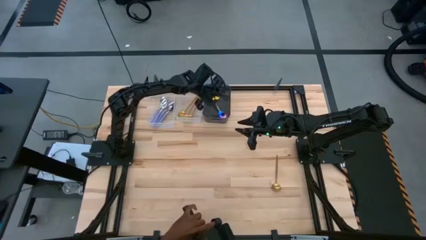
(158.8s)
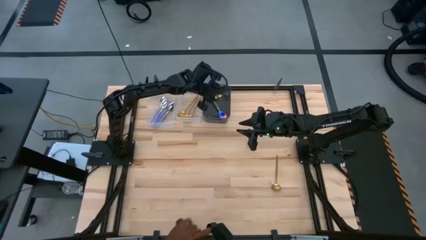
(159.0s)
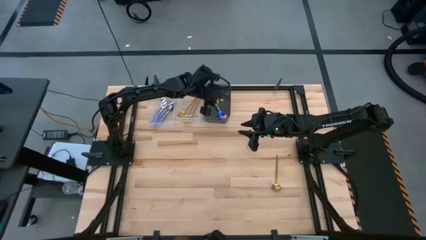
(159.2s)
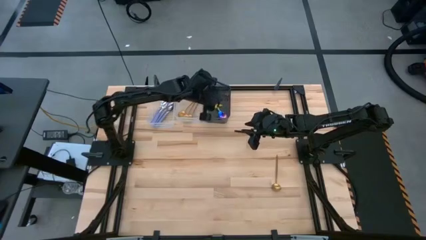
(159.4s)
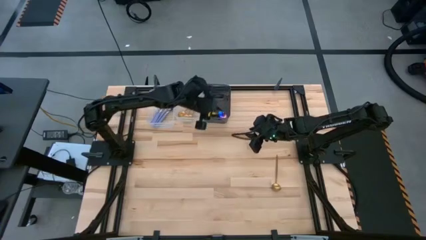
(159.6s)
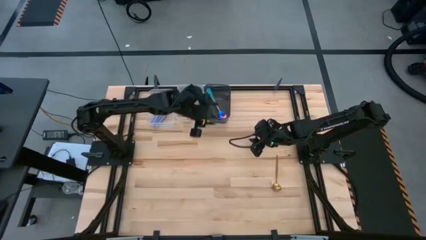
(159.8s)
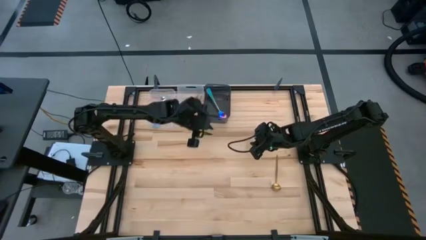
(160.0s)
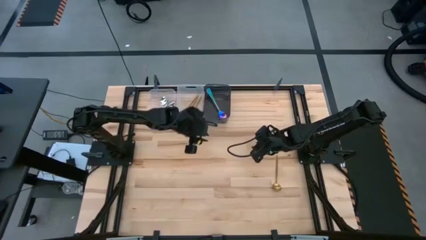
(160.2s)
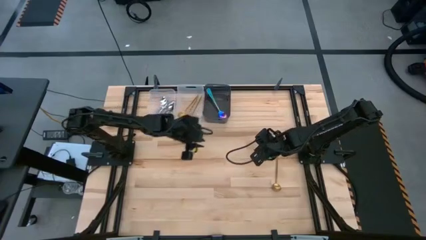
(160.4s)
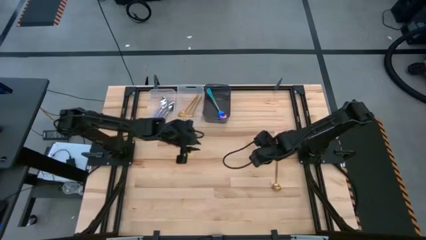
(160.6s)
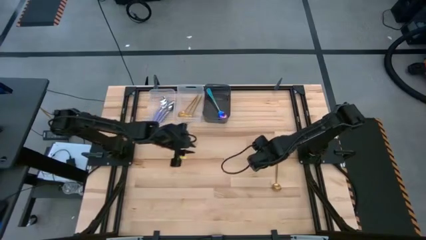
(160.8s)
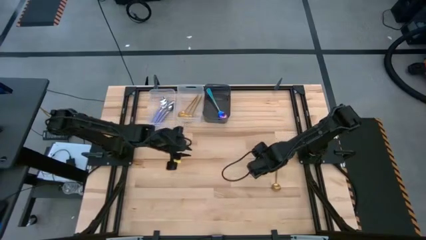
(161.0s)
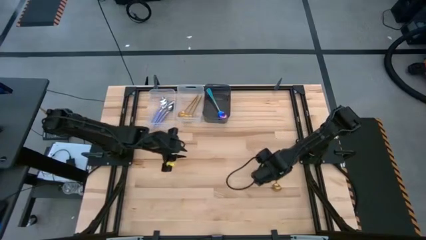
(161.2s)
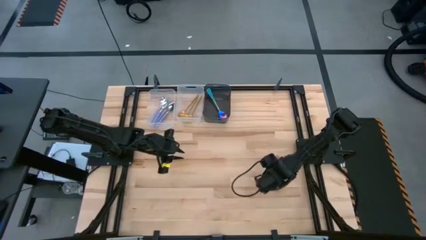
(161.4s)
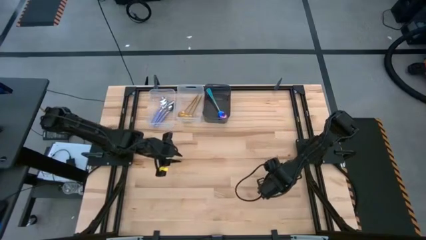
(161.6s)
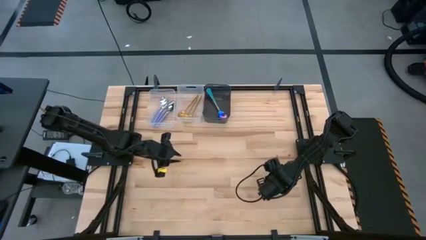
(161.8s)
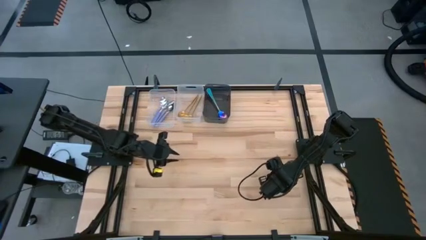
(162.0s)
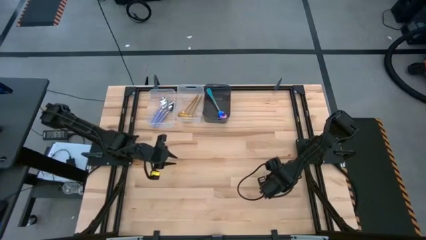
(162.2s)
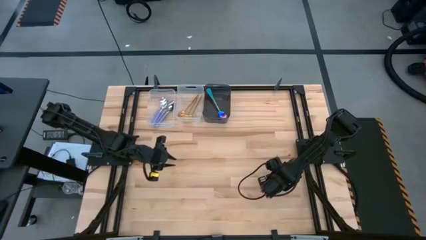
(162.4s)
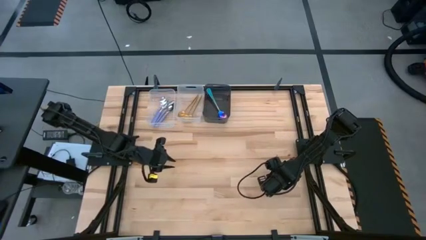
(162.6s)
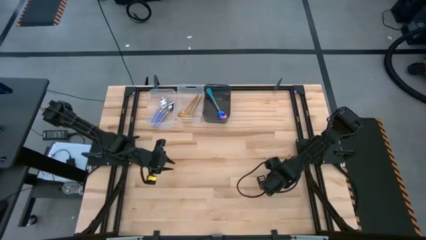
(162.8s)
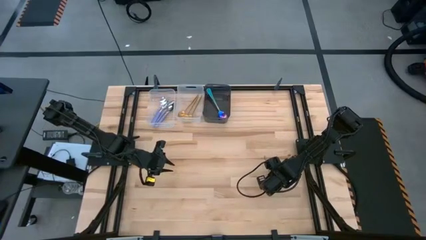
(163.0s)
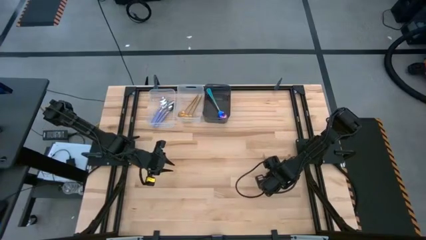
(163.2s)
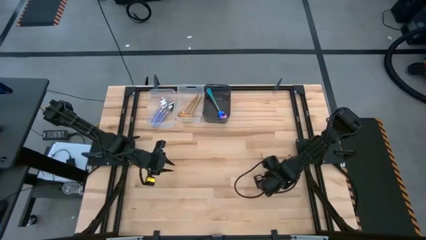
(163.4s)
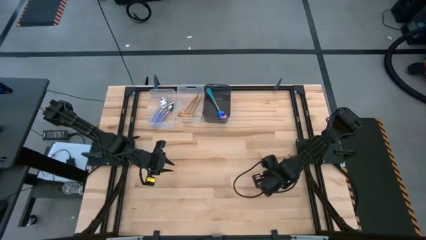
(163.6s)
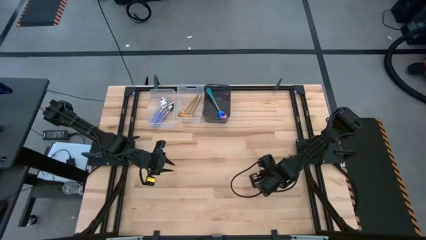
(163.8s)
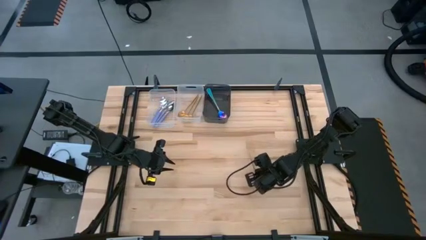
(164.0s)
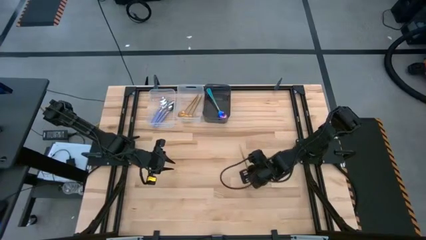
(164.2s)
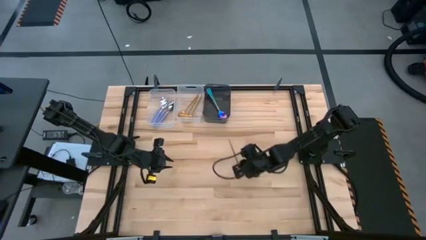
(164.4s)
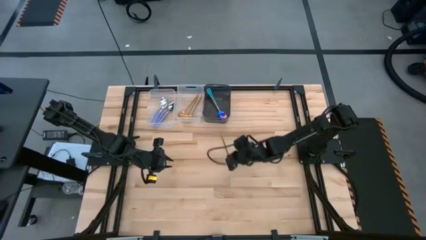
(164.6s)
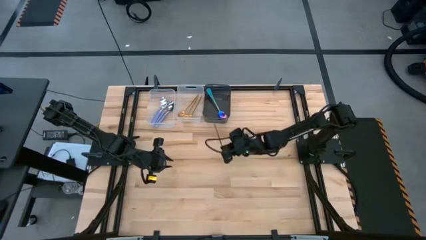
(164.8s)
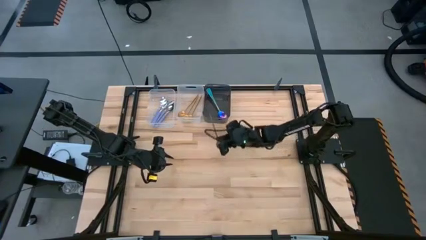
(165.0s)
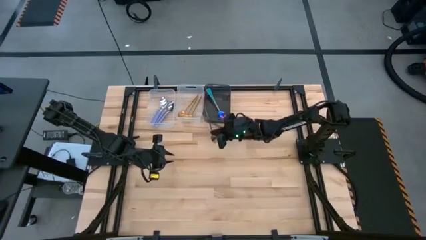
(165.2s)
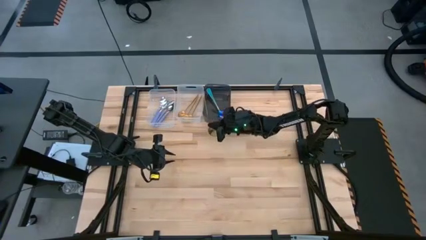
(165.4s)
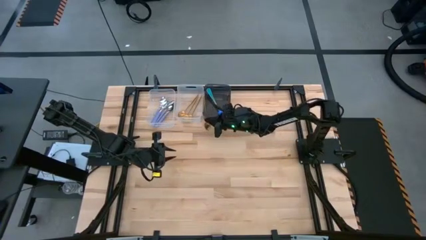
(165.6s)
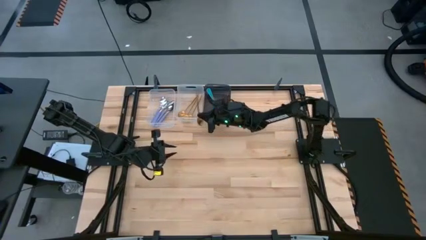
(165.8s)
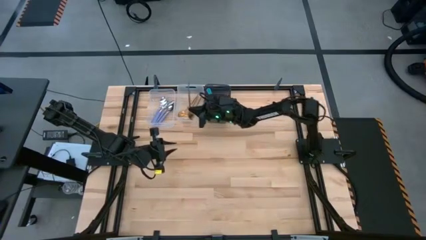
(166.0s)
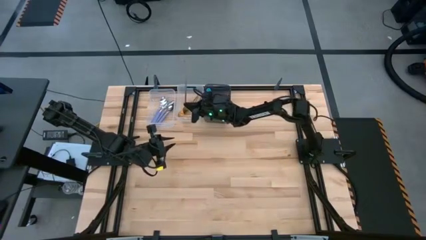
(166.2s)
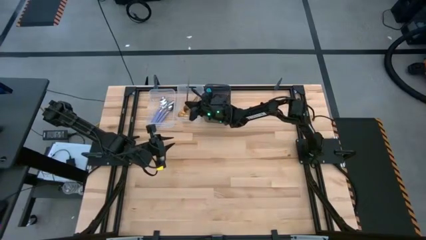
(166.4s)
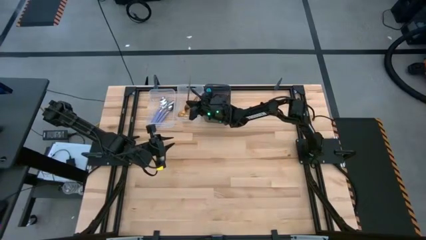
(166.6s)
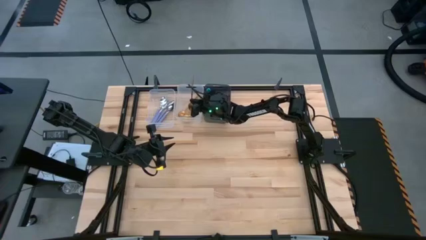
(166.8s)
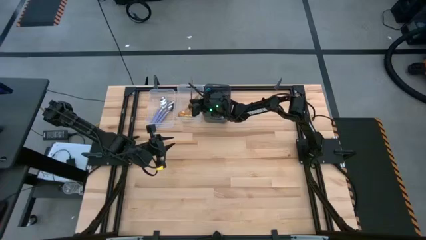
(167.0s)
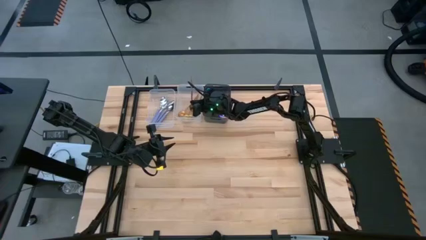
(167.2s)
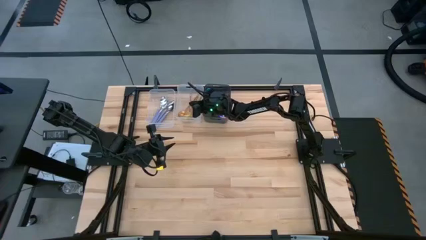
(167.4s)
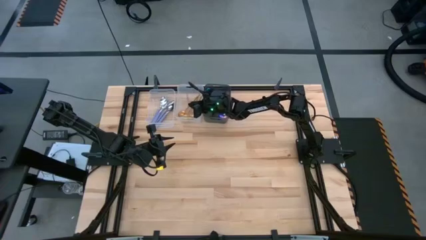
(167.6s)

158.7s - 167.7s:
Task: Sort silverware by color (type)
Put the gold spoon into the right transparent bin

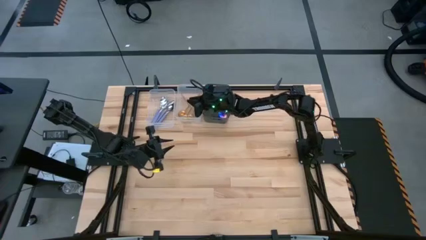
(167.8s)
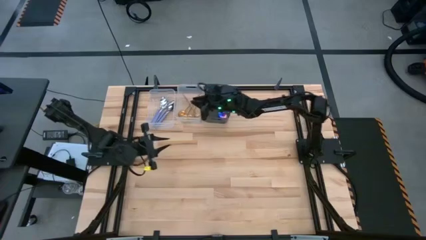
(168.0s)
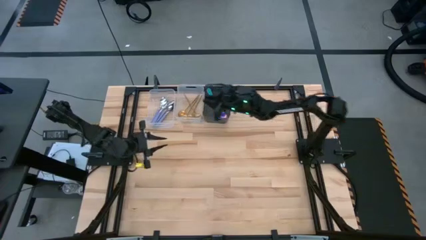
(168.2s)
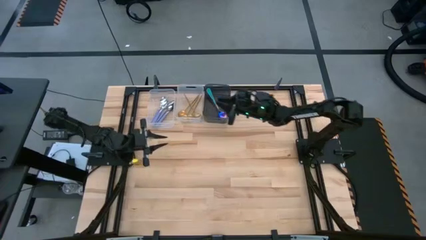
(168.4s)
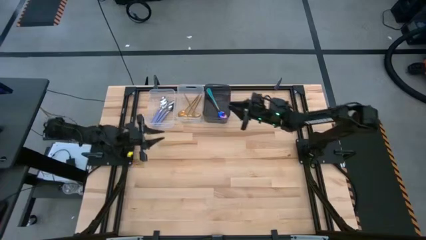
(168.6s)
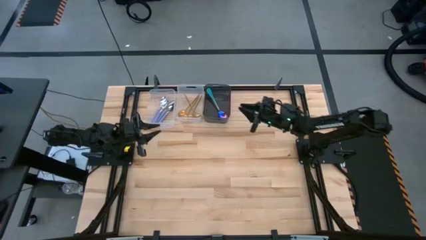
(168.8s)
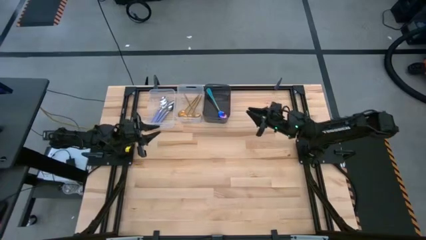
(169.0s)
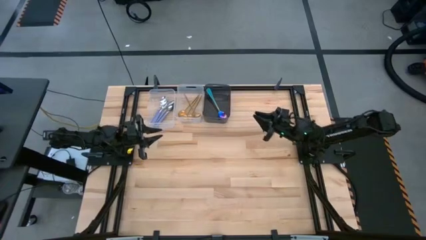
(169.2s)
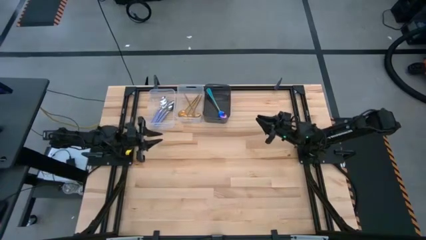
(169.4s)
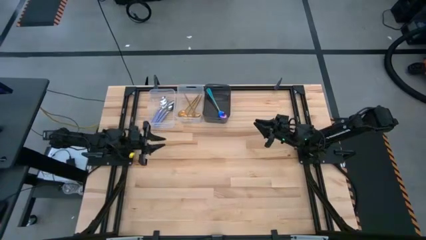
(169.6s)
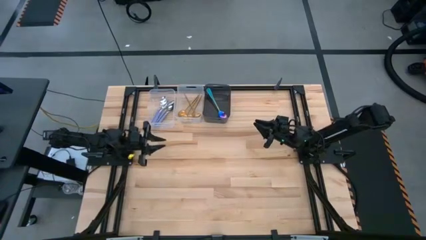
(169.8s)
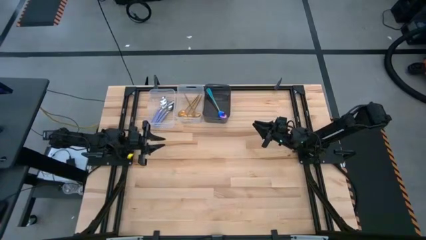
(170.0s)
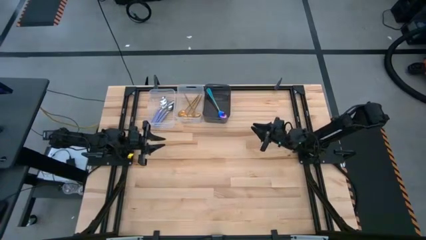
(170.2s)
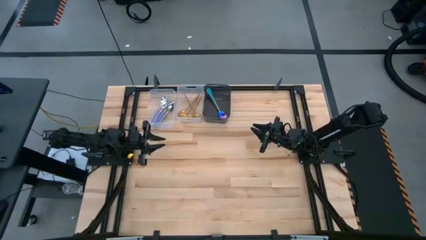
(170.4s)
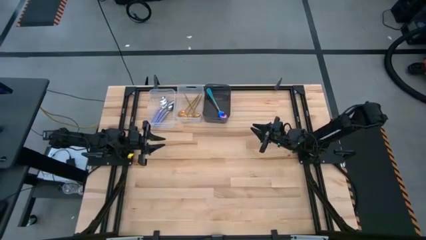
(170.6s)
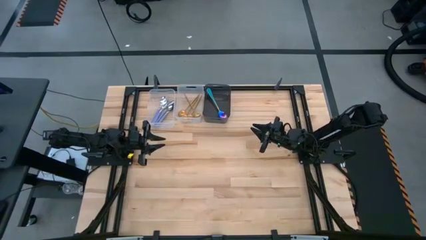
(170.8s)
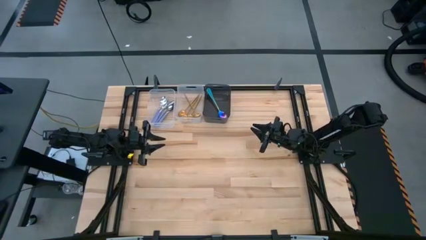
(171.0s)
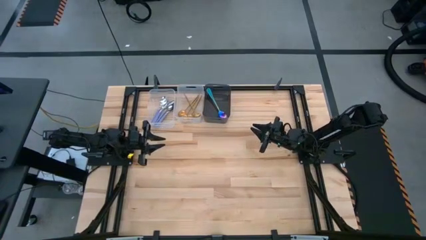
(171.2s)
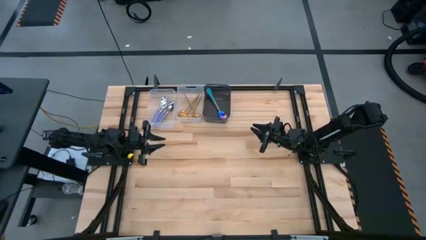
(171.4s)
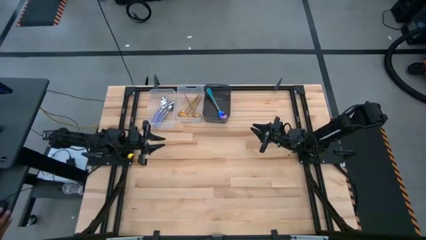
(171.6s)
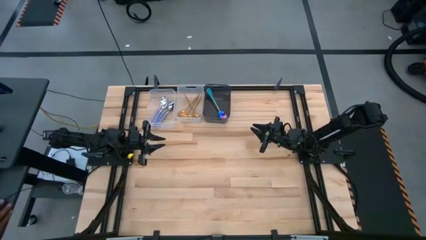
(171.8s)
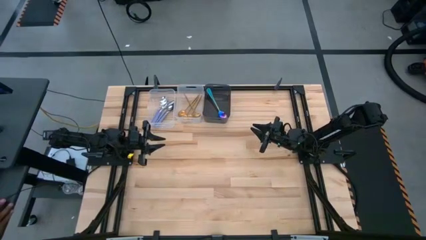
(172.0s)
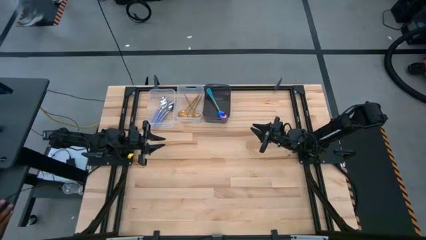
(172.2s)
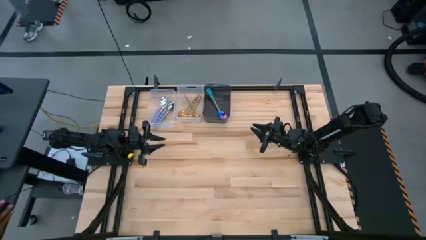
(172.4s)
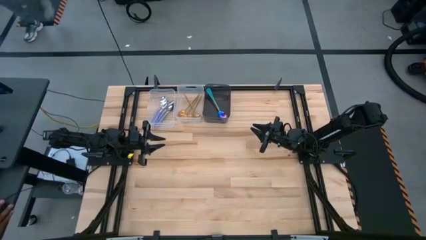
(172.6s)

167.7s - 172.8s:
Return to Home Position

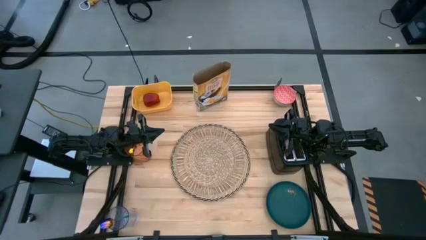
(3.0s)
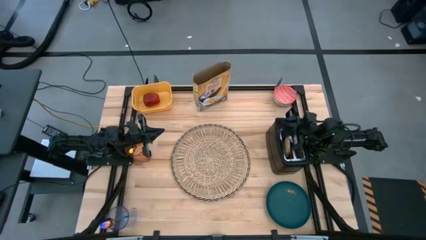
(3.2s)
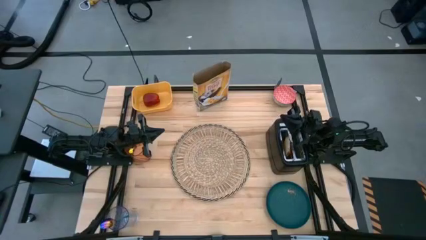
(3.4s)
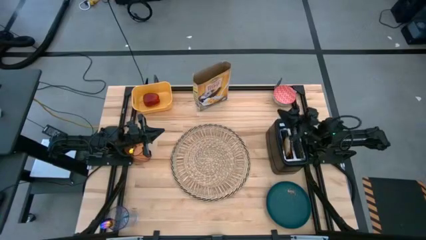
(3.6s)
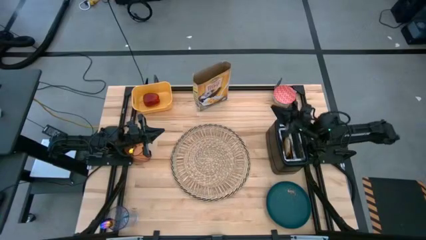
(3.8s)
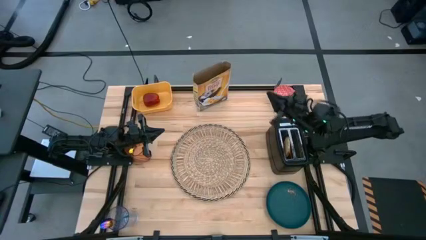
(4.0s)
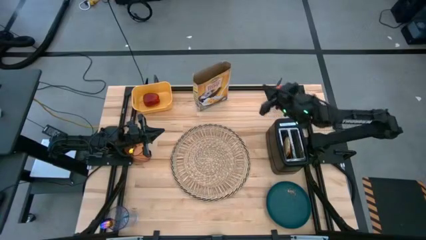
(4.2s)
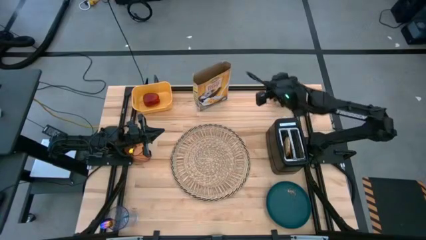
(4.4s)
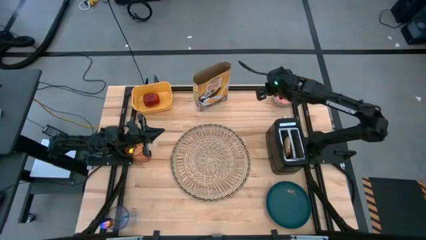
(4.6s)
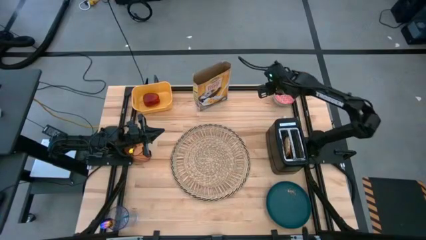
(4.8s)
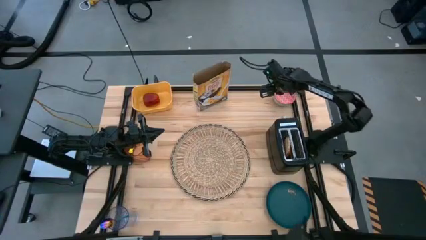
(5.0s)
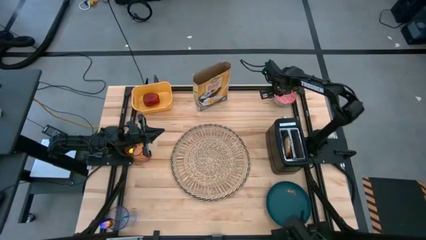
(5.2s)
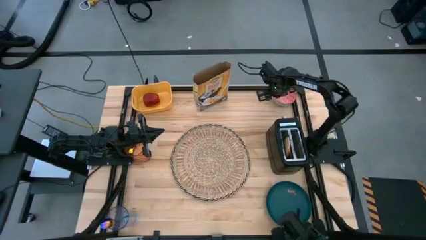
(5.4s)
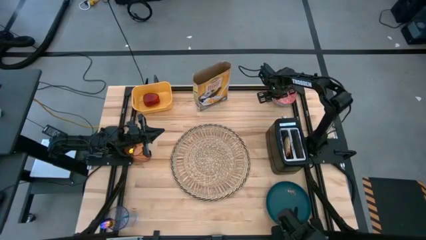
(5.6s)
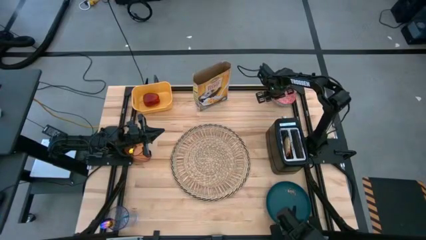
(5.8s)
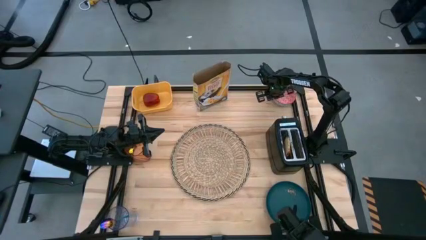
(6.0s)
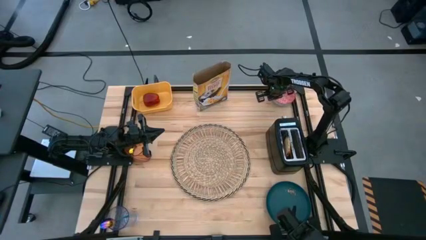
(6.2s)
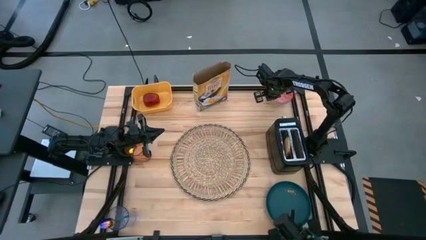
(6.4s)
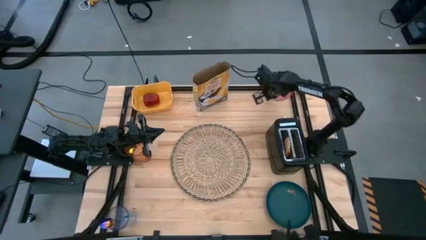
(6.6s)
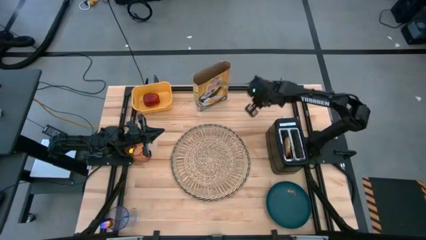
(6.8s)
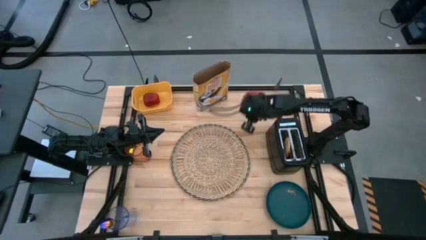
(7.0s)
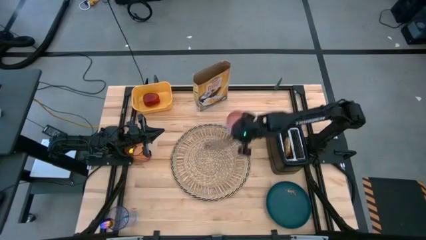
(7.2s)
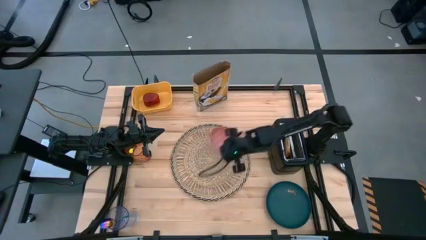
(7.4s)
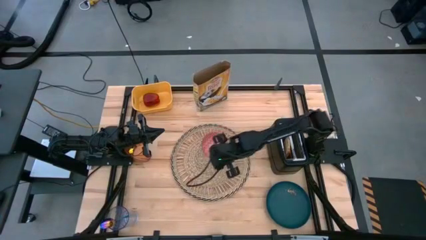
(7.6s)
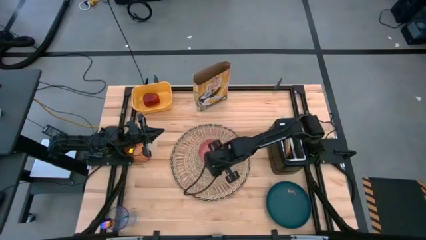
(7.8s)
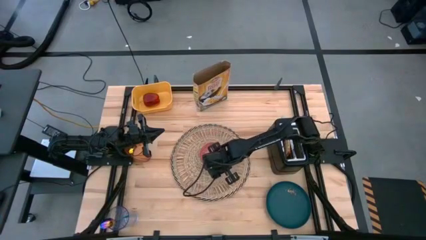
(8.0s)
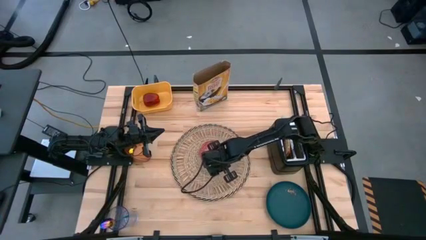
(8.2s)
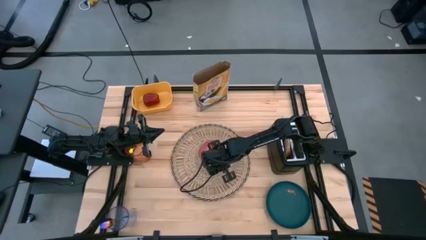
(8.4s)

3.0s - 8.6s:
Task: Arrange a breakfast setting
Put the red bowl on the placemat
